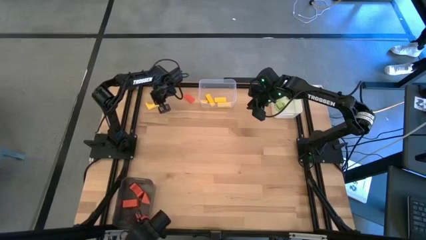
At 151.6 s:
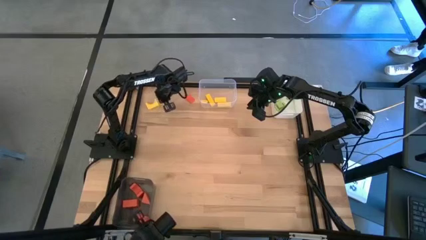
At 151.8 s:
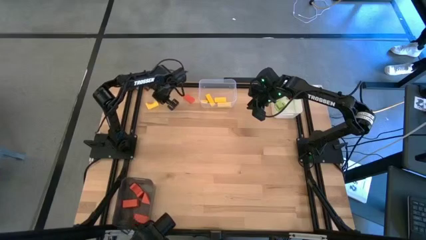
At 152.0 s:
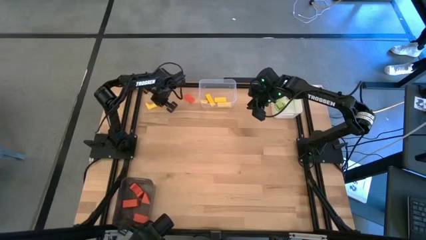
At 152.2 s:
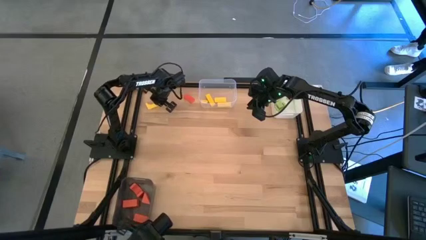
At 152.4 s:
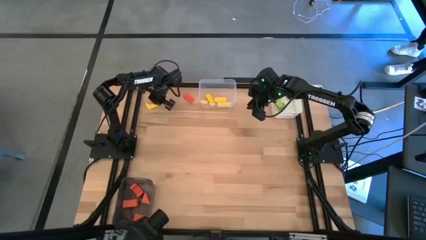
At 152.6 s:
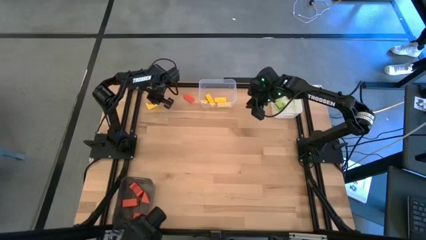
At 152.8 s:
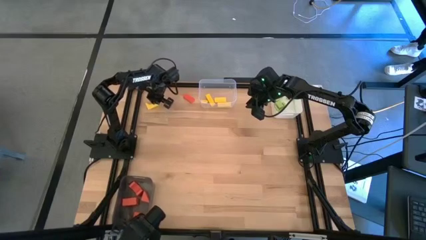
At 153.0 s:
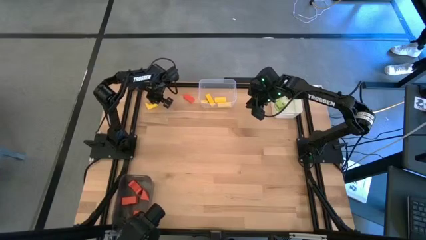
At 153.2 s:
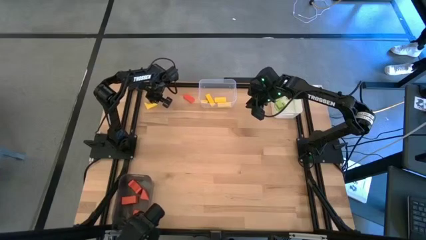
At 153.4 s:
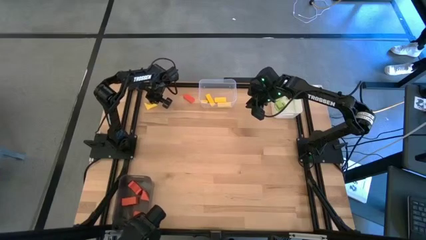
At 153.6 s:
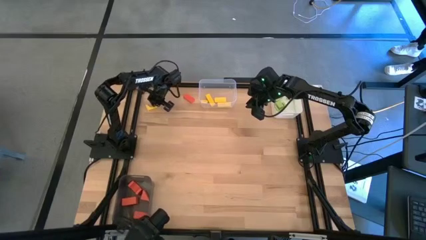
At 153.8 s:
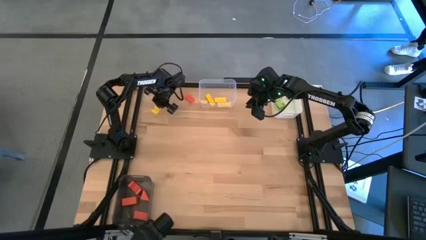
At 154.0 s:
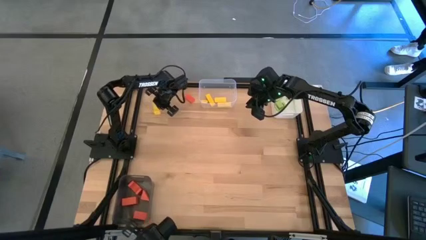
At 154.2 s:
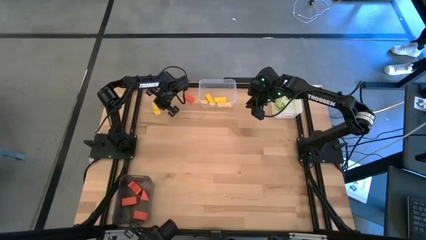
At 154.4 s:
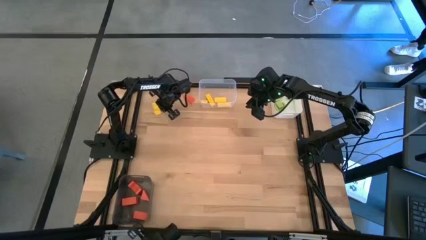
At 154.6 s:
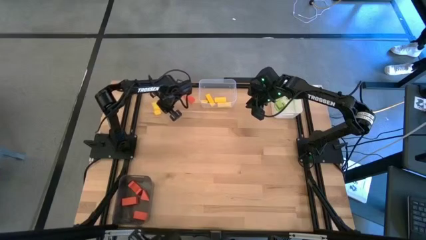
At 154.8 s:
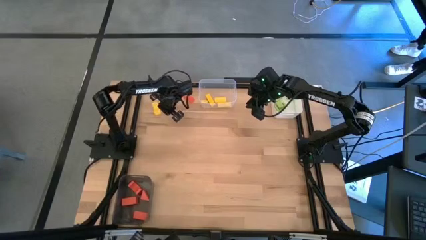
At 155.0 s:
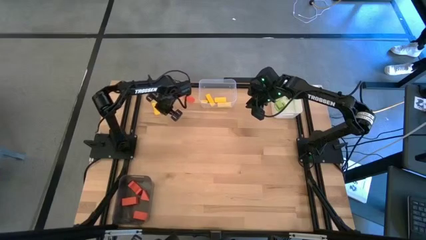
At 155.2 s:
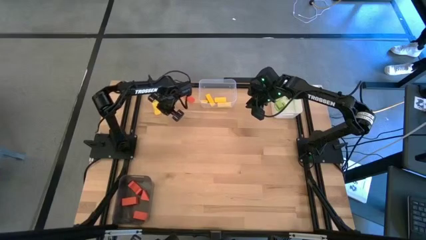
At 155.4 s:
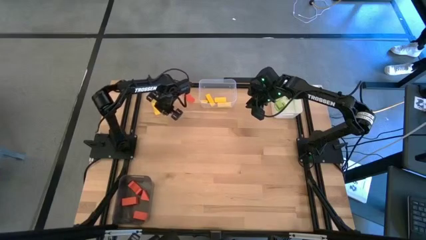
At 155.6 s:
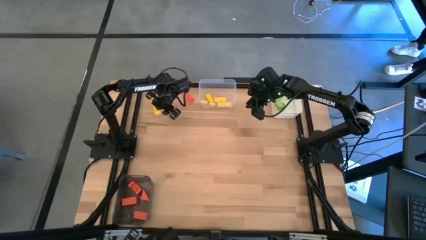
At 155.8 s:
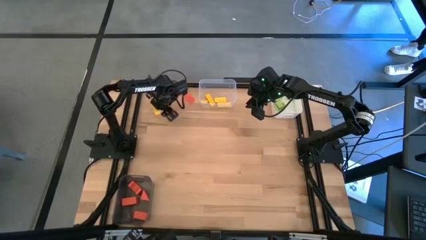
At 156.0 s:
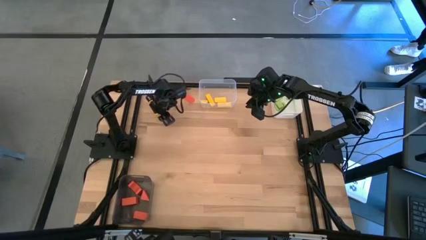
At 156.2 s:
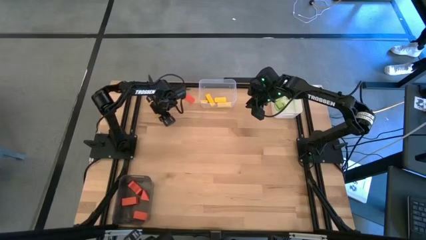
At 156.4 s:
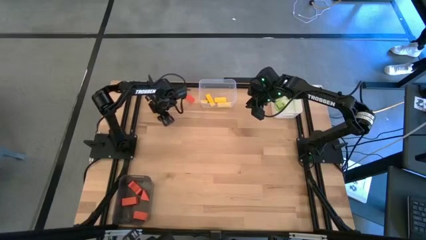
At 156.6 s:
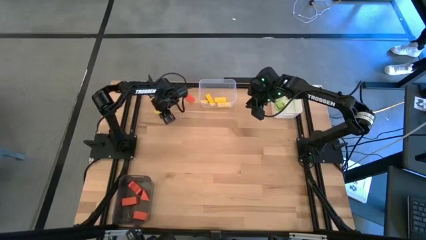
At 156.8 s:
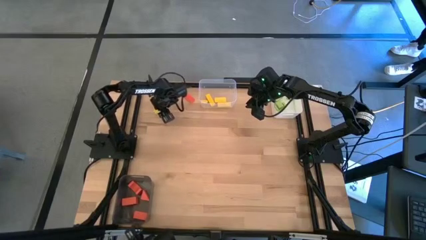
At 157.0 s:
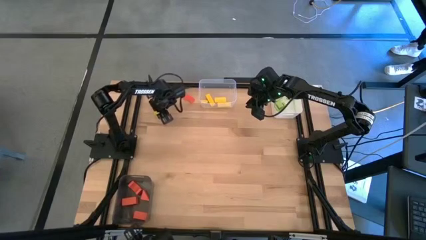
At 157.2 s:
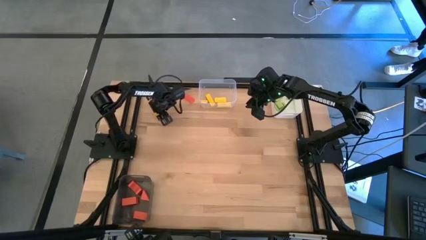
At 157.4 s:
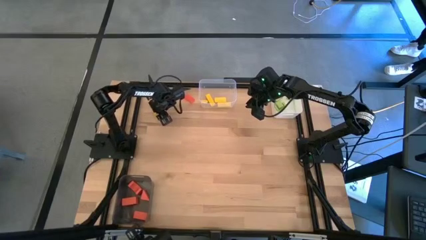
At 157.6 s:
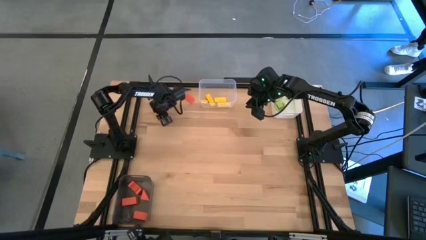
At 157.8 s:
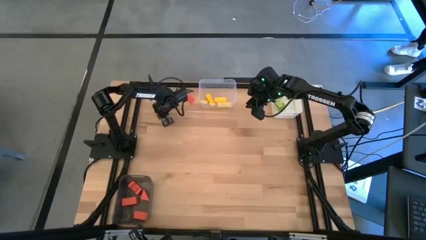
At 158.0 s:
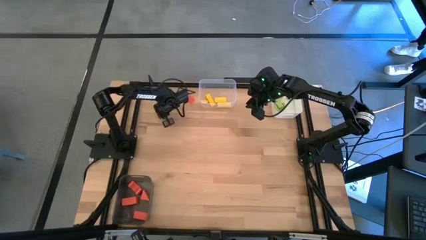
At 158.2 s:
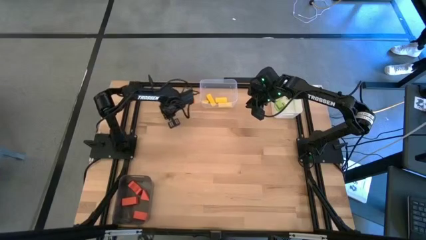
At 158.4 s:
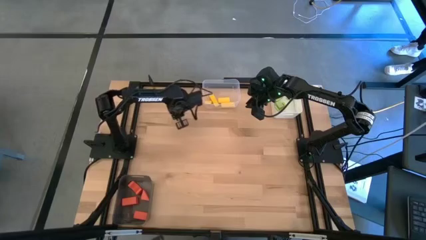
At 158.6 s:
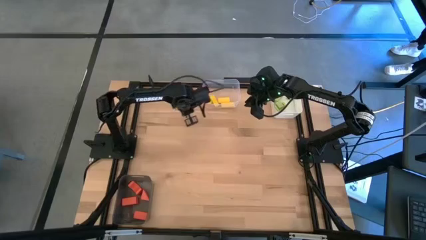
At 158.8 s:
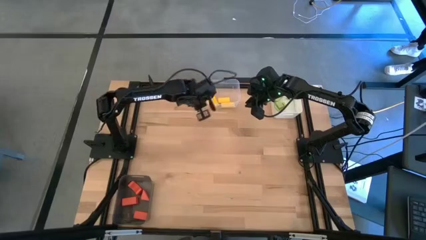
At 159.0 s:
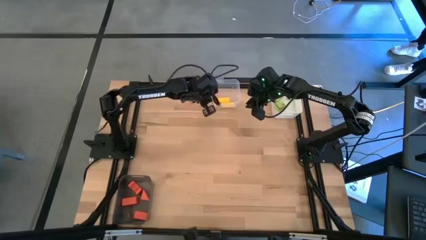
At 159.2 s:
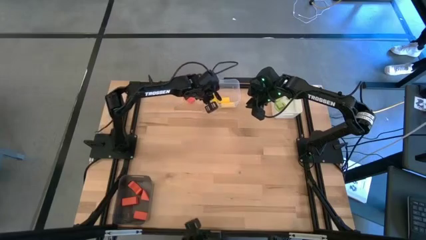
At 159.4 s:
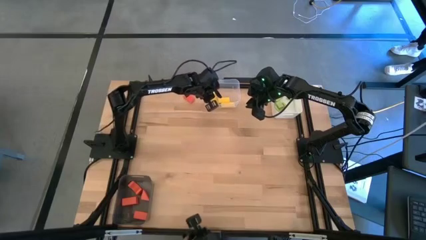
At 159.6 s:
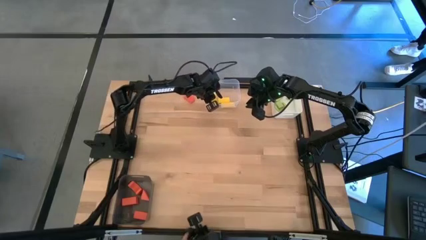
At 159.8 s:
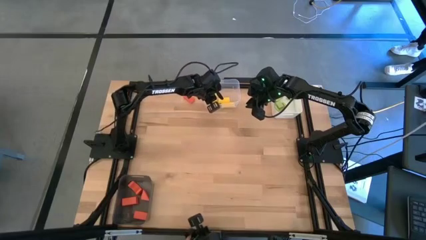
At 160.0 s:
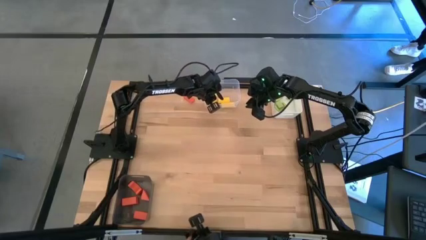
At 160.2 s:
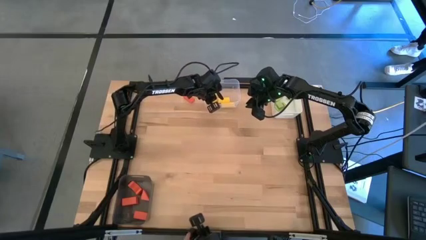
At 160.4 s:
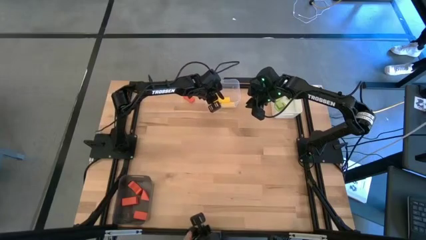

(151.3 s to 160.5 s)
Task: Sort & place blocks by color
Put the yellow arched block into the transparent bin

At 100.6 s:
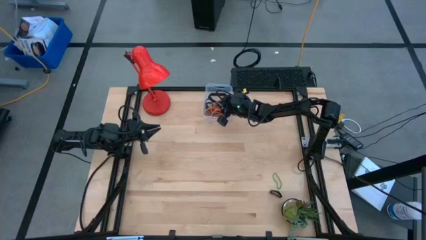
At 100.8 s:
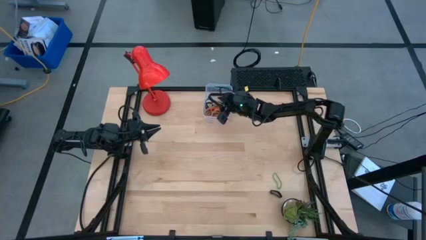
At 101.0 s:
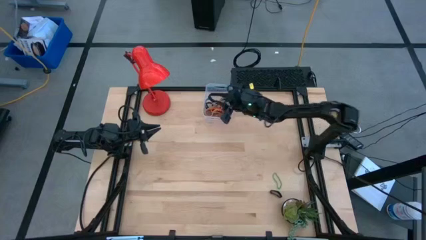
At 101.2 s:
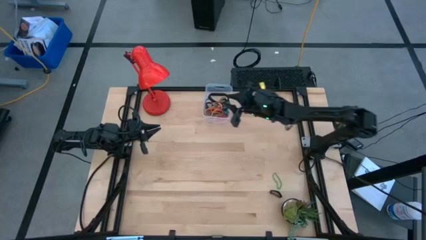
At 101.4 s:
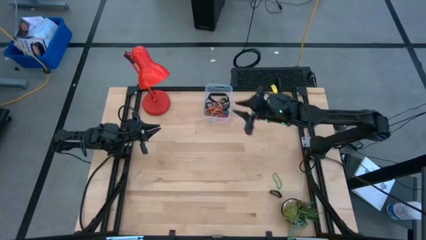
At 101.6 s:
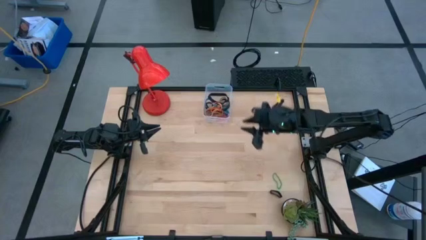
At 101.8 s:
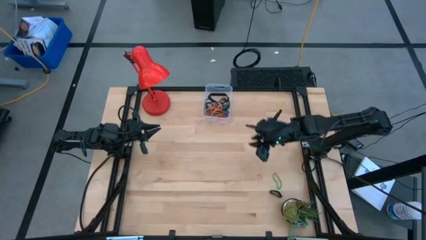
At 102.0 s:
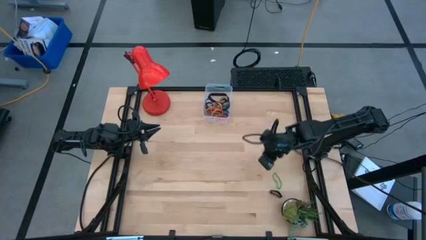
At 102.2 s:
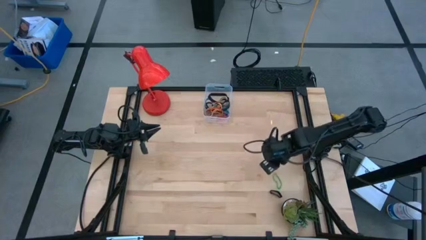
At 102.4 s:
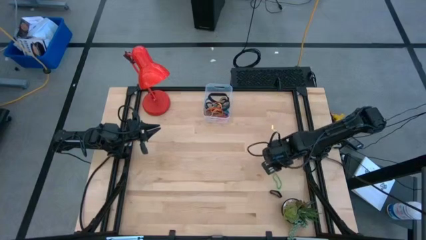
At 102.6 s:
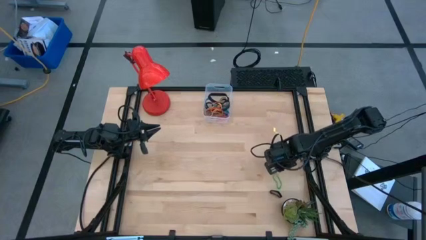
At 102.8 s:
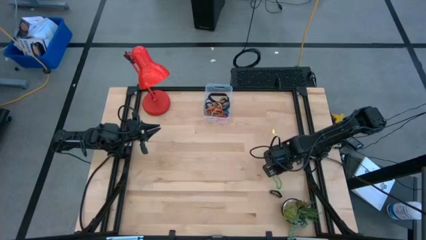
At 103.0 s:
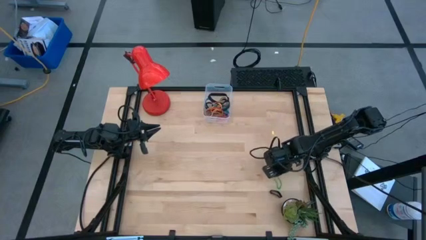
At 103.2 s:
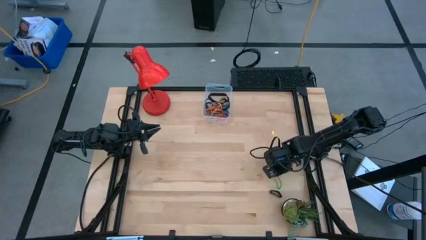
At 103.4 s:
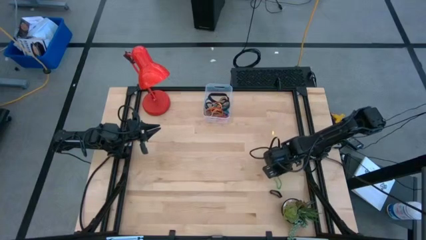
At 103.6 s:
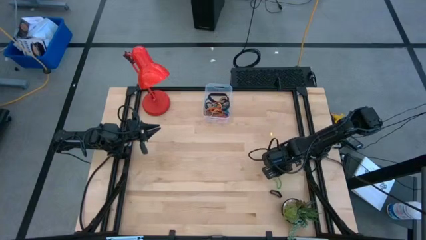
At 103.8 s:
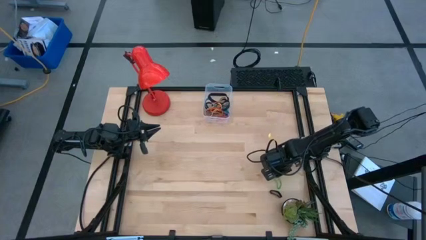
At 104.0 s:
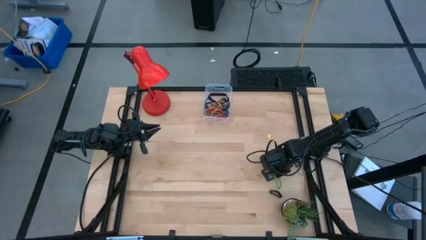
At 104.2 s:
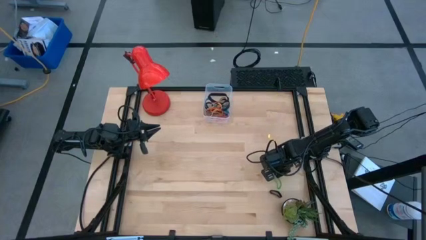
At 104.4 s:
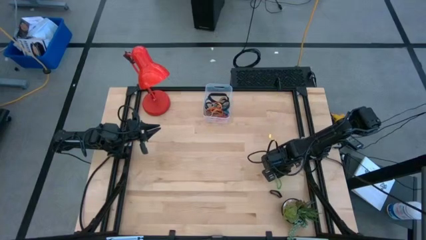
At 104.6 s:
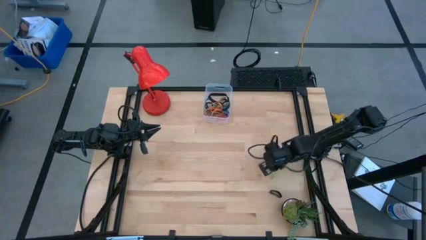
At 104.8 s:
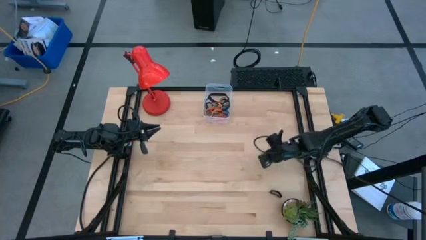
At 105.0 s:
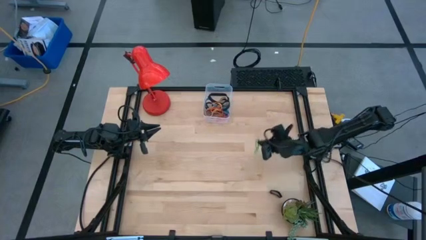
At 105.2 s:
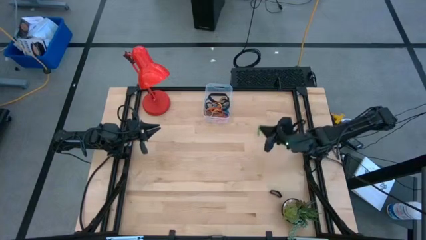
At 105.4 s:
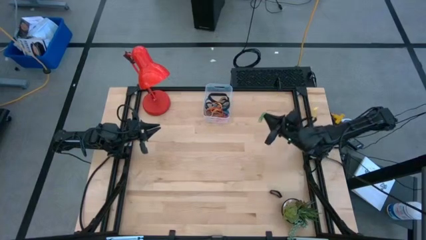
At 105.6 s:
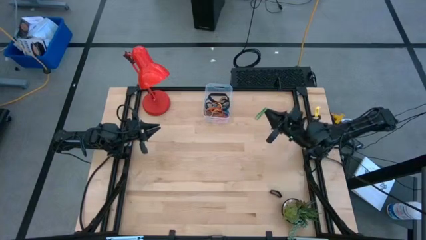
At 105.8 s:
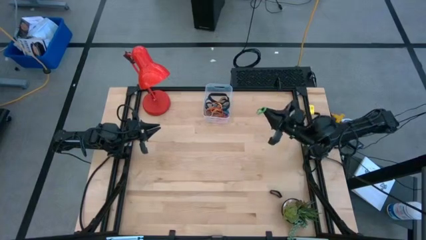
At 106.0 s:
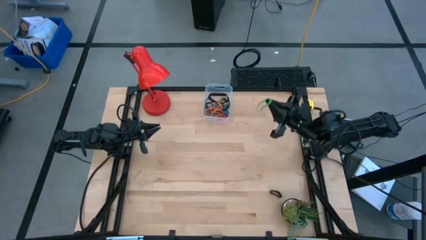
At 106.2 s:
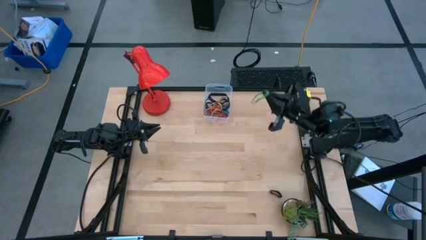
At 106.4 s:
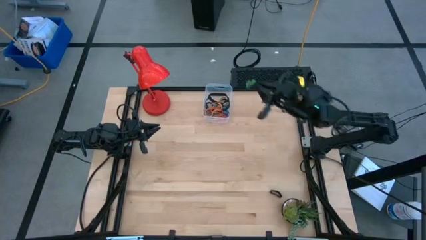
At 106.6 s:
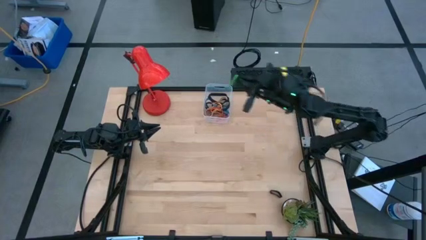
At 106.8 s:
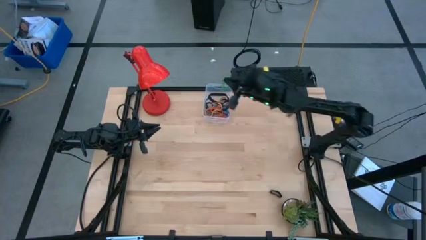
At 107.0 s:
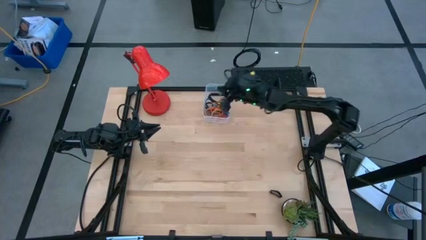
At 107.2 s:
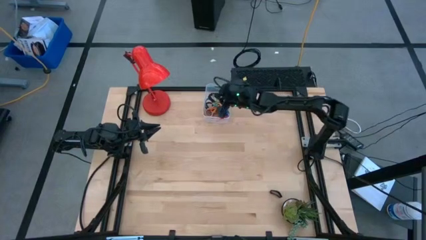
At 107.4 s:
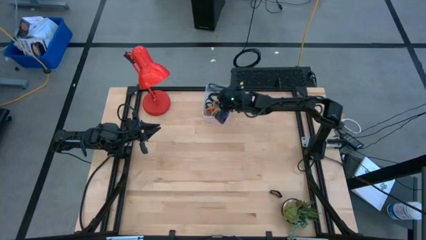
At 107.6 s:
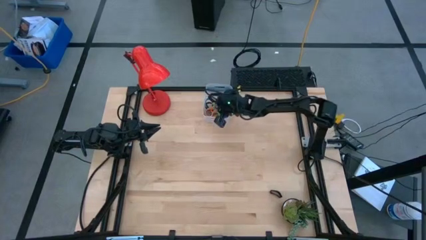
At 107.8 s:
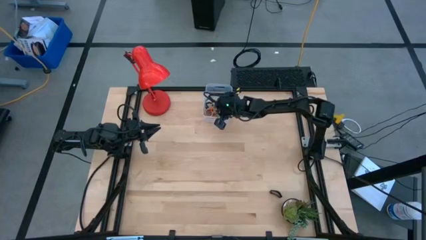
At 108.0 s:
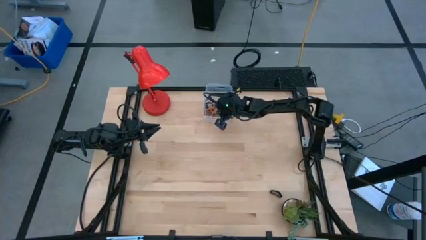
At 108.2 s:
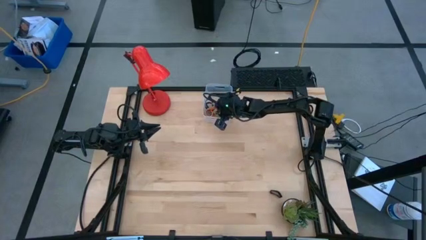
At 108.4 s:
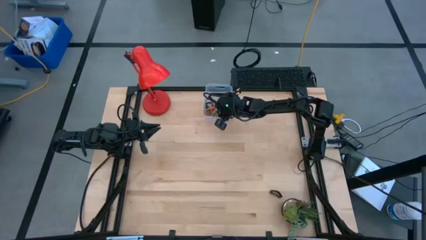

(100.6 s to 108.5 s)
Task: Pick and place rubber bands into bin
Put the green rubber band into the transparent bin
